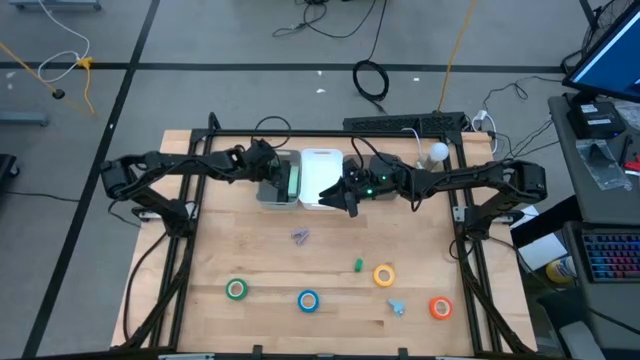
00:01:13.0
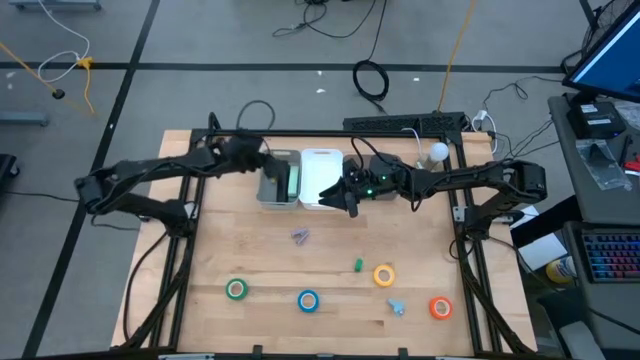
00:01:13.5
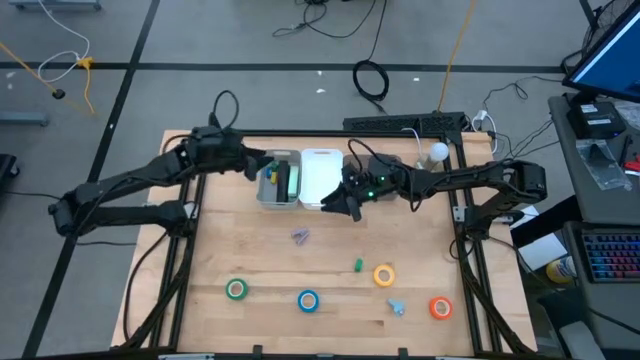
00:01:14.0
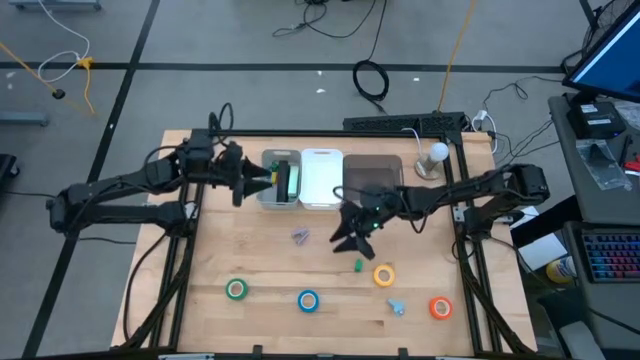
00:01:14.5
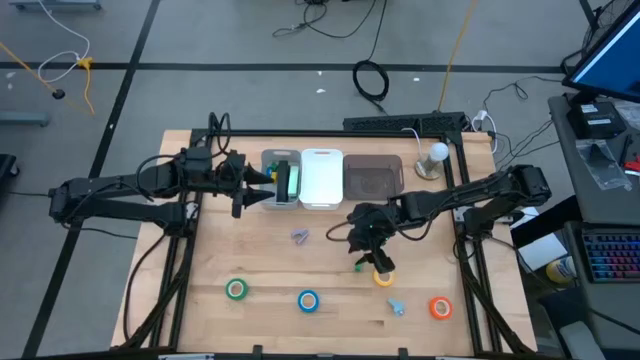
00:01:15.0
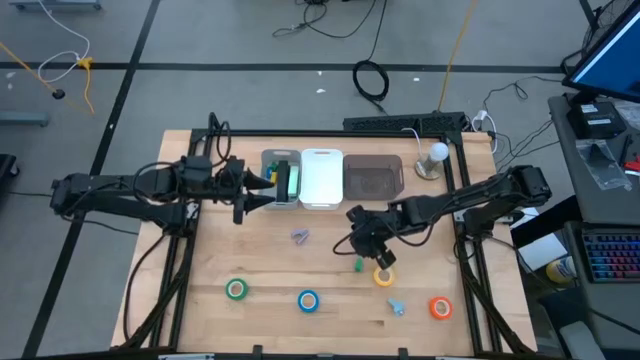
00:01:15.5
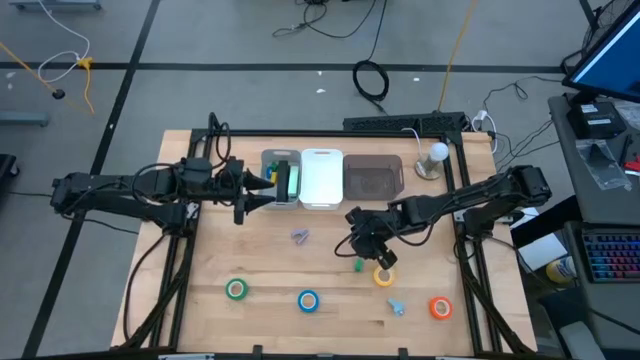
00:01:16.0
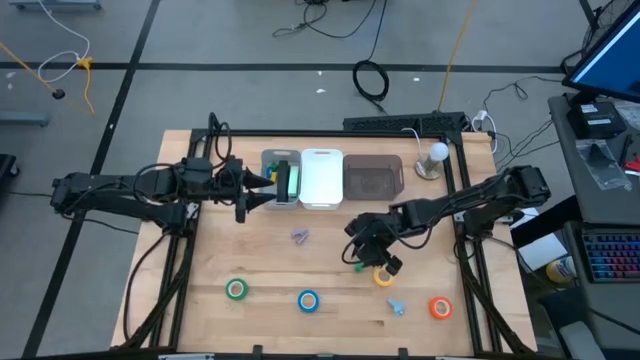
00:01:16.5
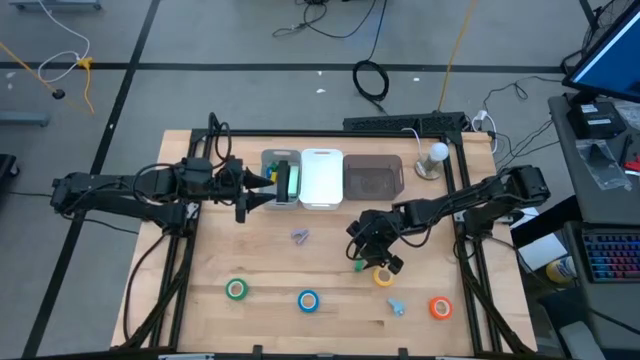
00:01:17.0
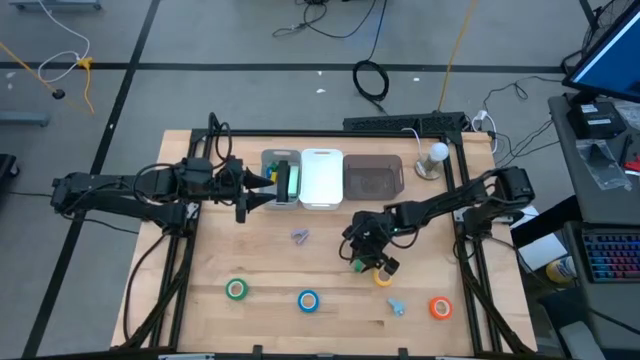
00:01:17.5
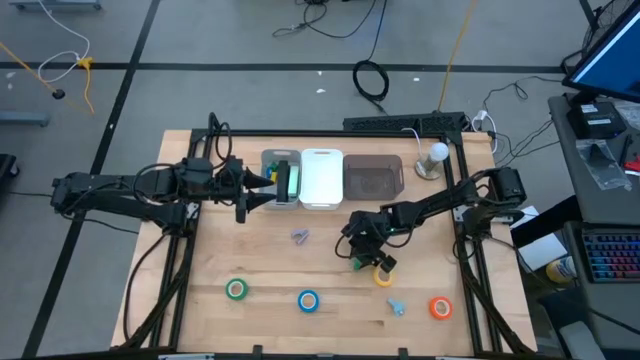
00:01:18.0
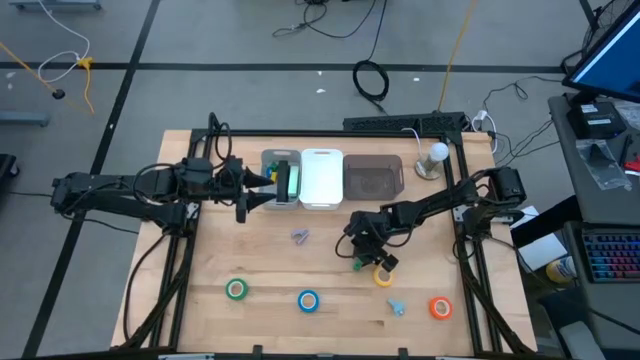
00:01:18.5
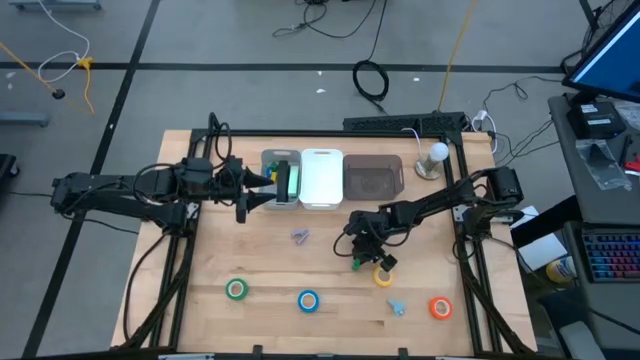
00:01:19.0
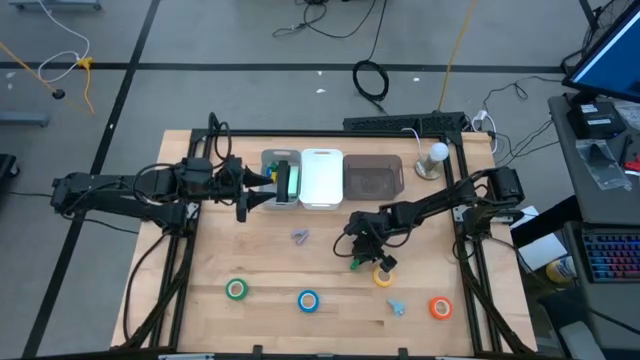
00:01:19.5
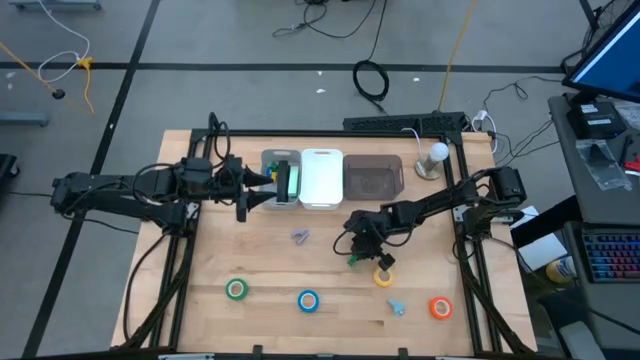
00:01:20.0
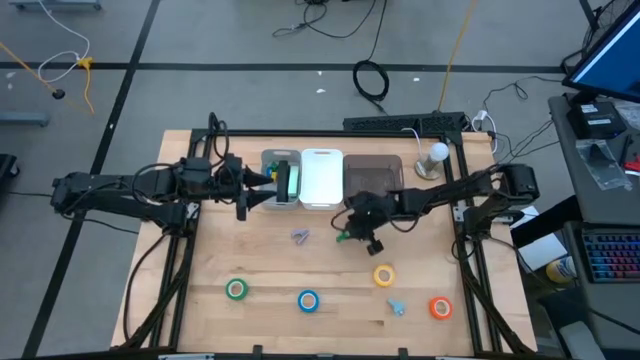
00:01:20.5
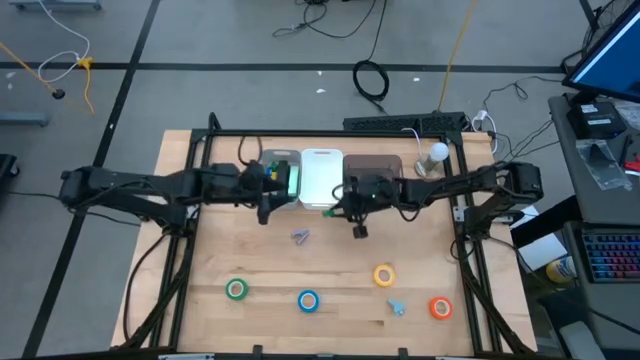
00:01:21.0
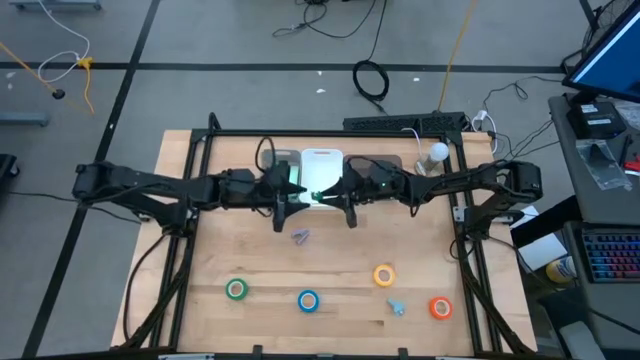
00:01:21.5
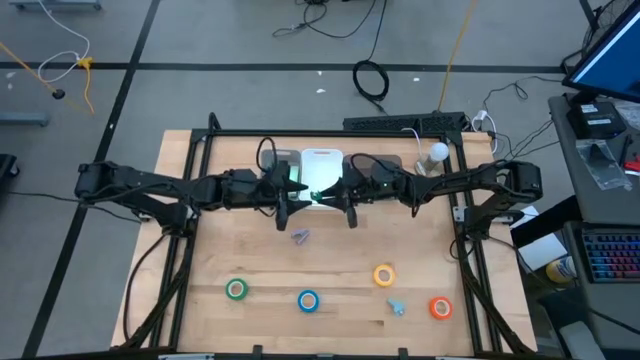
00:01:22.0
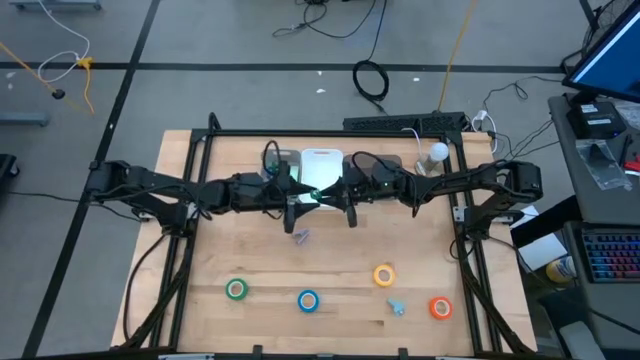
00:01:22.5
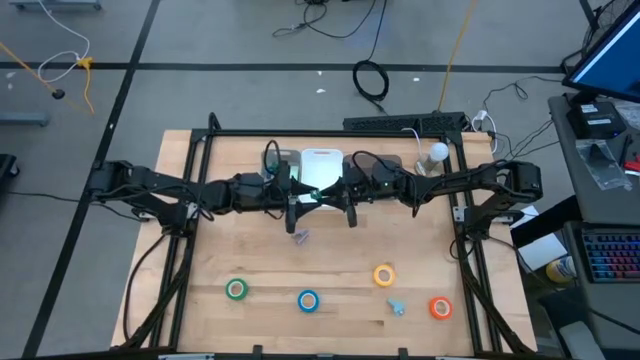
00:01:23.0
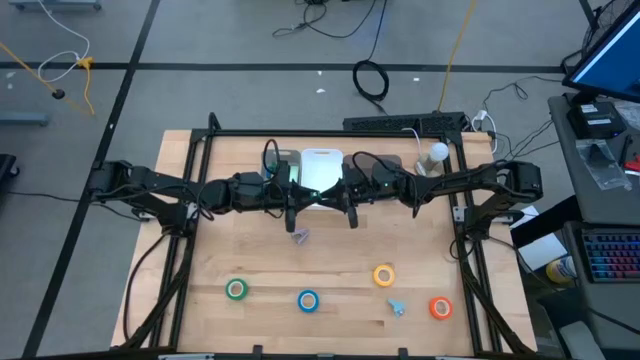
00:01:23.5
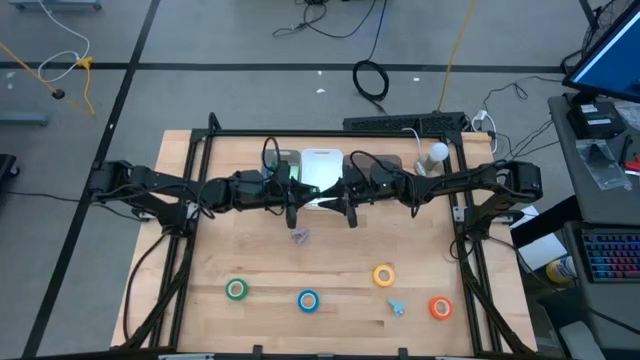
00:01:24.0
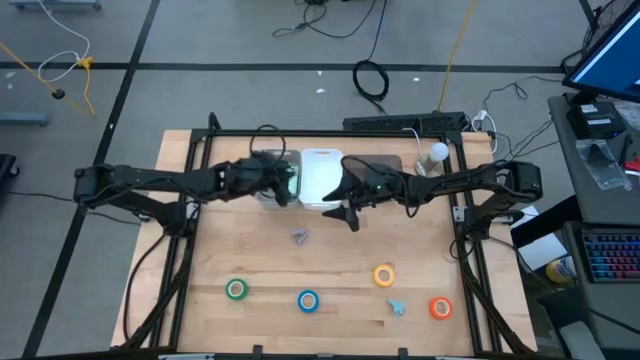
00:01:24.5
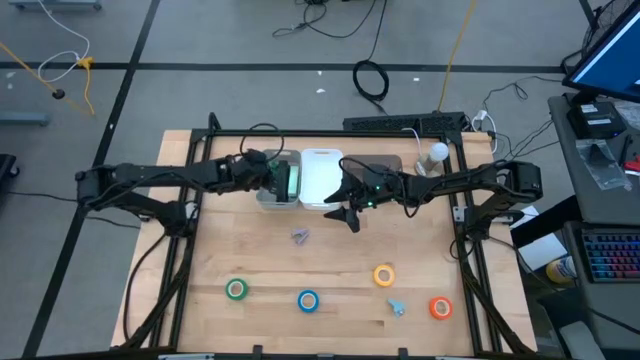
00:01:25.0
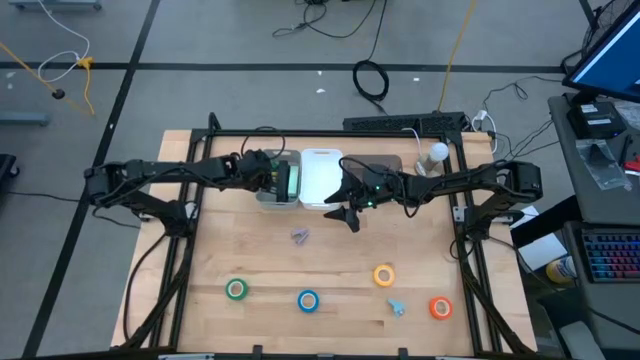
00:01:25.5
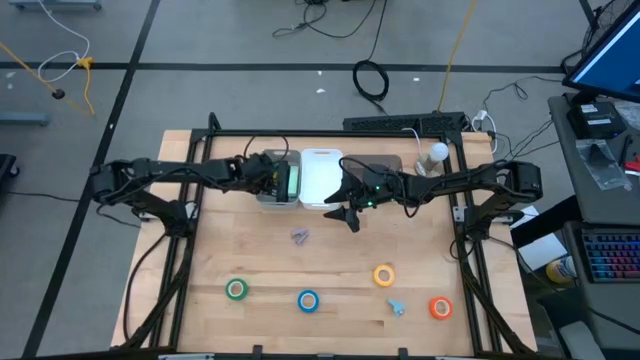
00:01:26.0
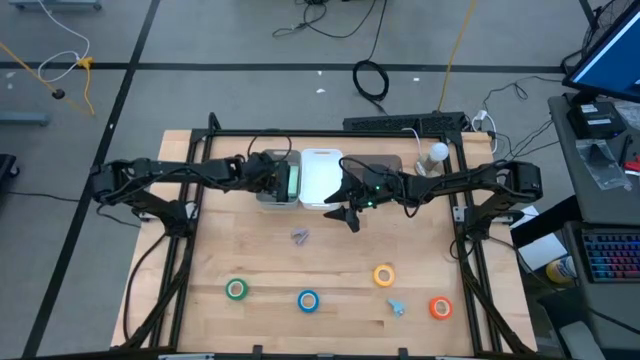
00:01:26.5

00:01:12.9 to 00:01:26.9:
Task: Pick and place Stapler, Stapler remover, tape
Put the green stapler into the gray bin

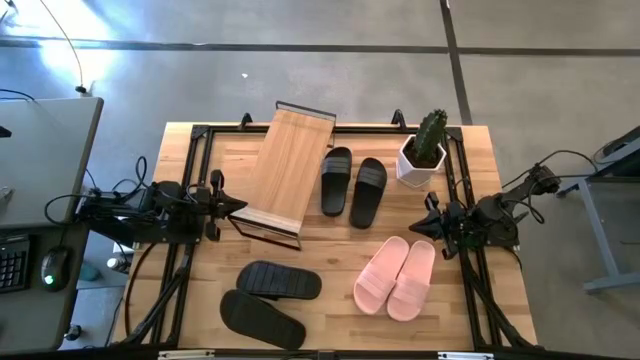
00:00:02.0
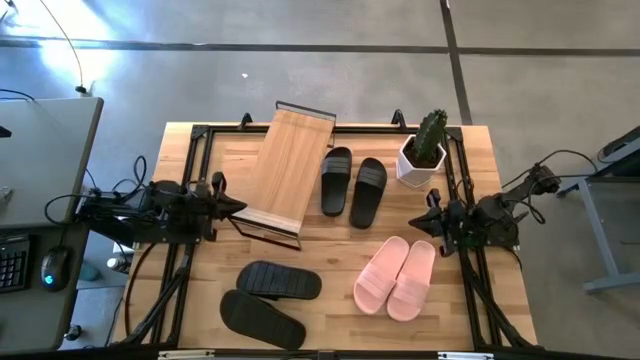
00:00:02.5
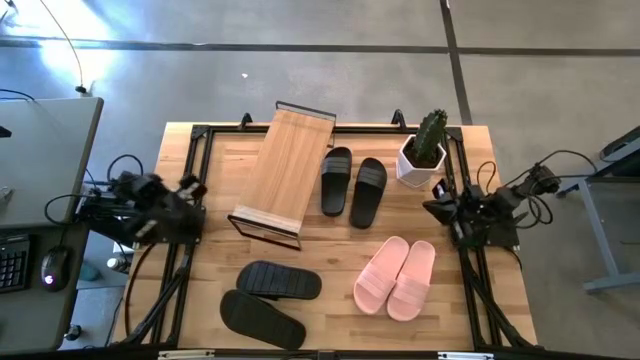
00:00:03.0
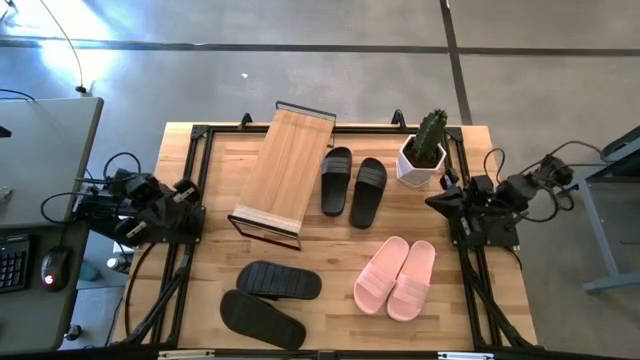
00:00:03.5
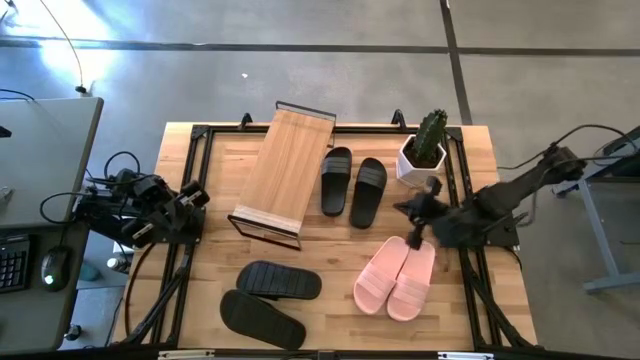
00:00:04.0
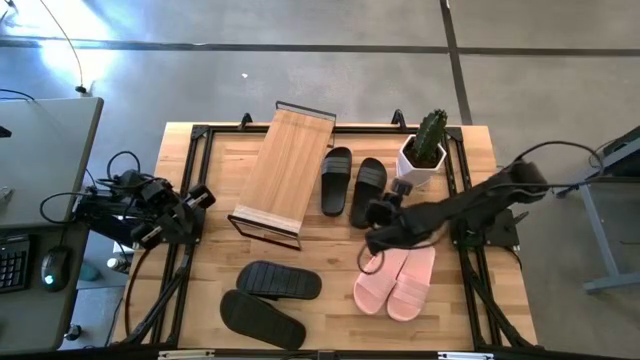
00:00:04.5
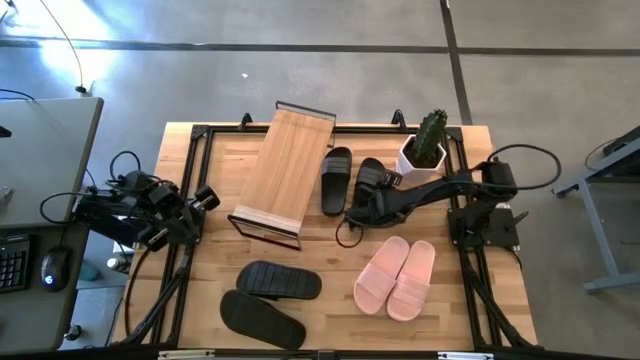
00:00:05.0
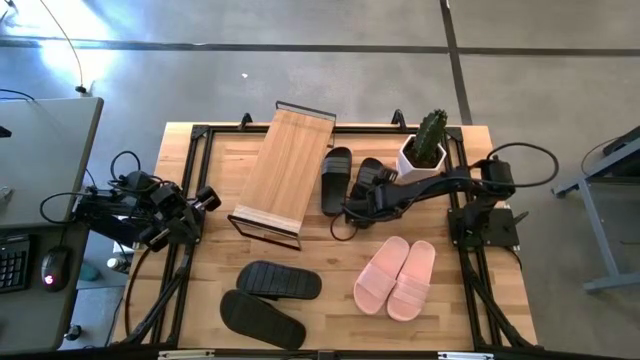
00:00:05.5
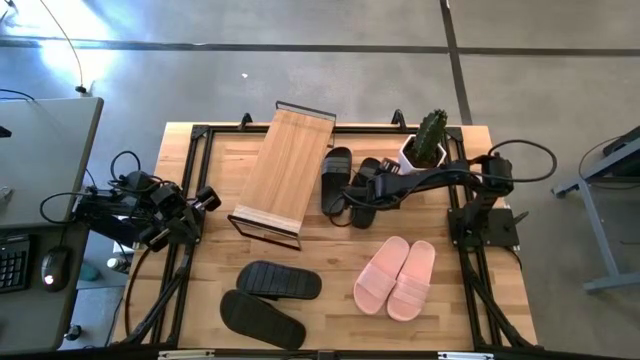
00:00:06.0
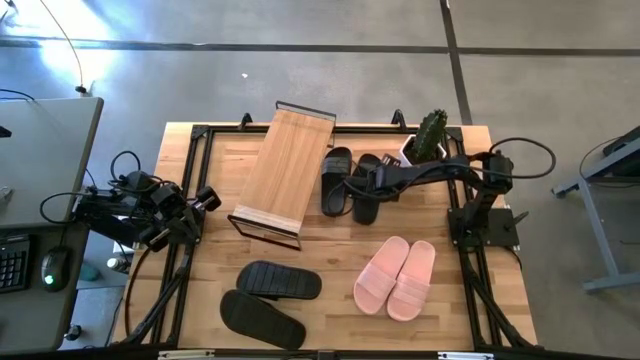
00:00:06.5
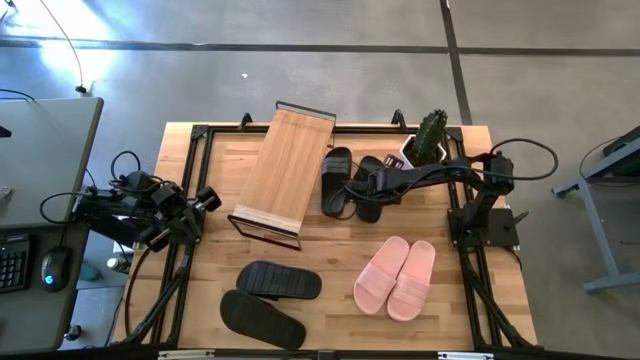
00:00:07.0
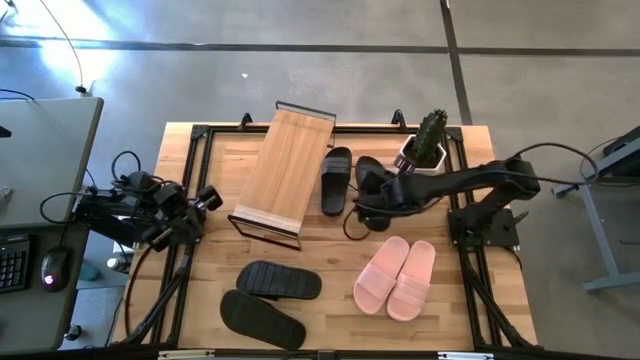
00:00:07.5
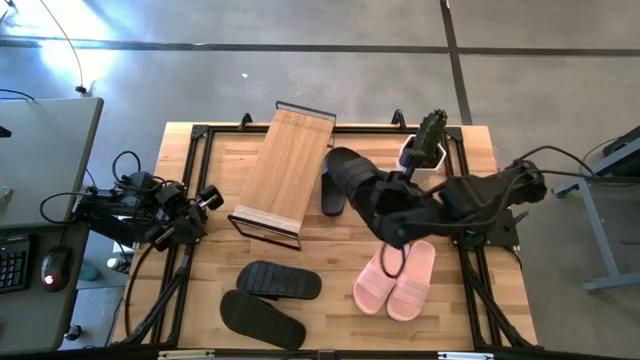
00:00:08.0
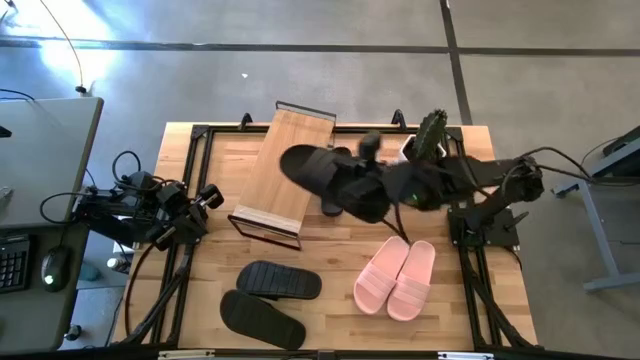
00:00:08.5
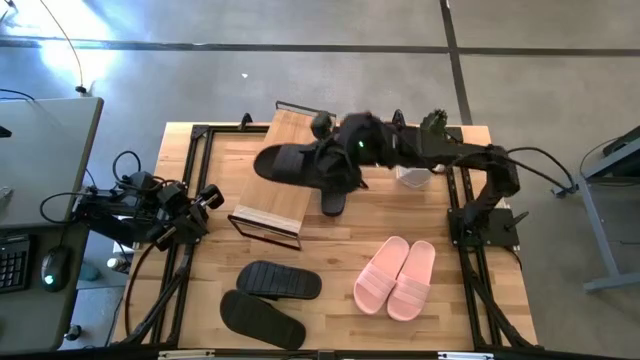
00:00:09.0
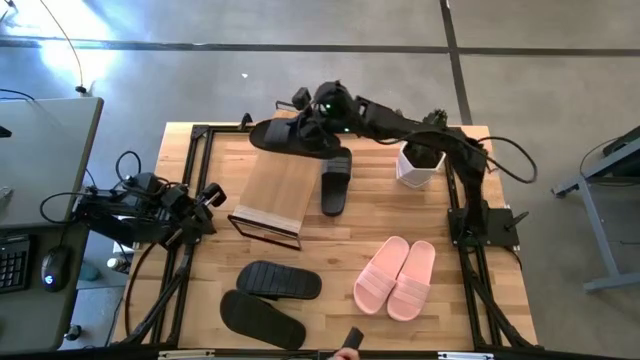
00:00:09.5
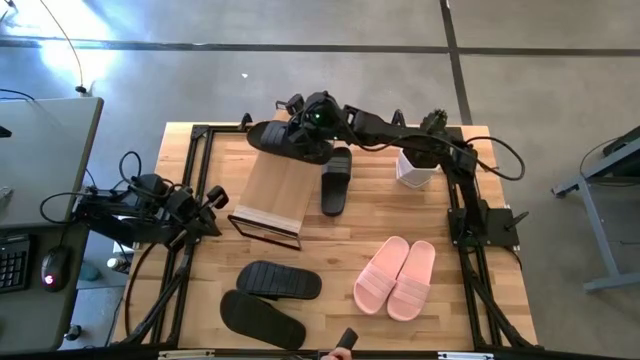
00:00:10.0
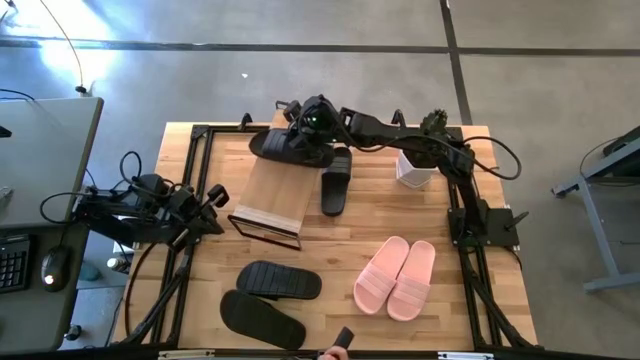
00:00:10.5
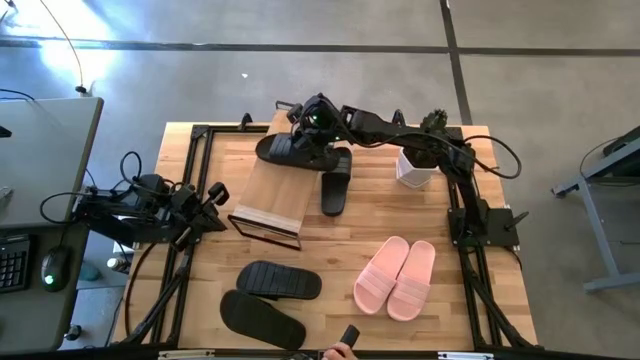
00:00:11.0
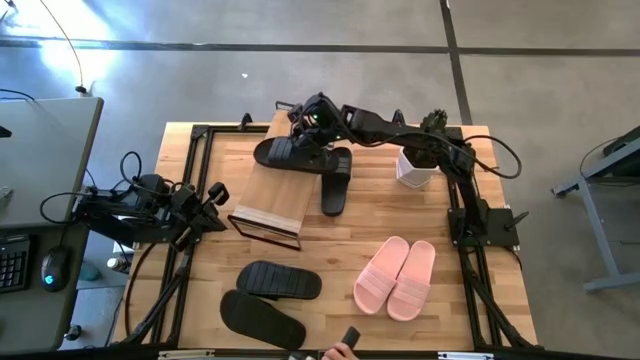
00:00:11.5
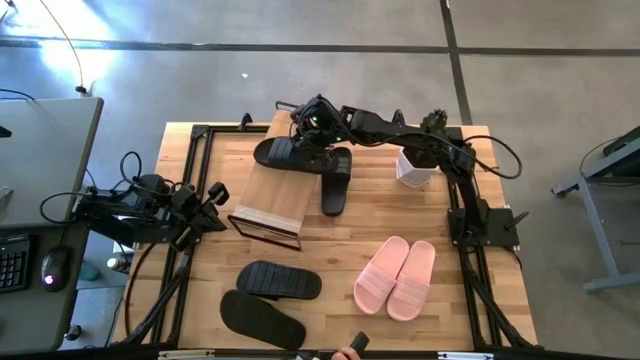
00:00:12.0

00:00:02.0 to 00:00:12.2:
Task: Pick and place slides into the shelf
Put the black slides on the shelf
